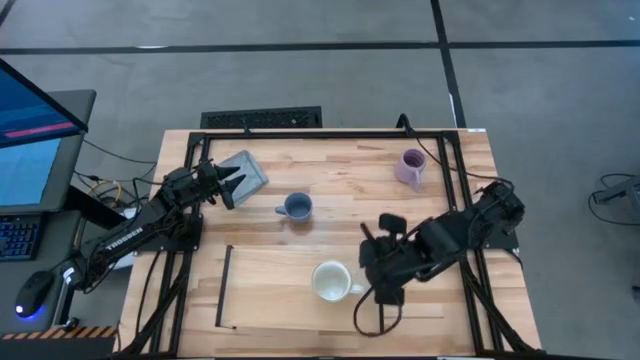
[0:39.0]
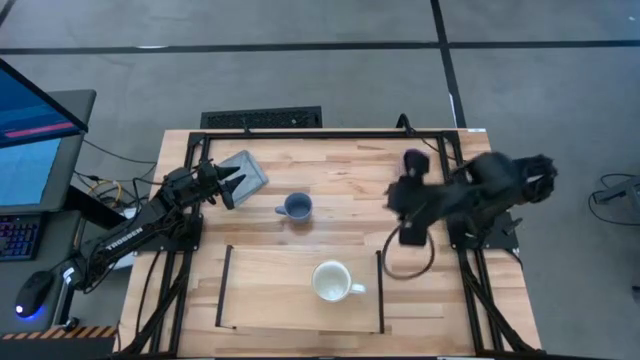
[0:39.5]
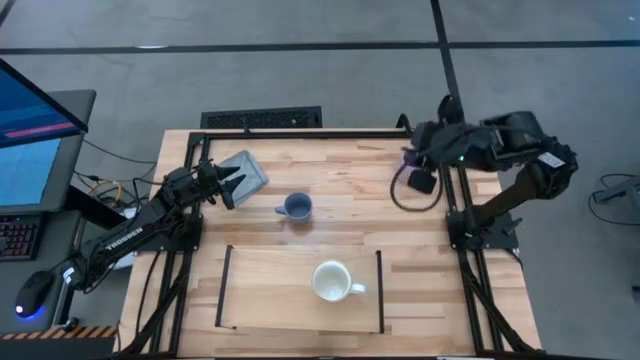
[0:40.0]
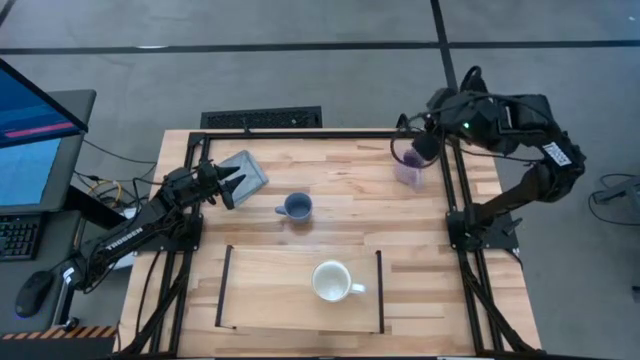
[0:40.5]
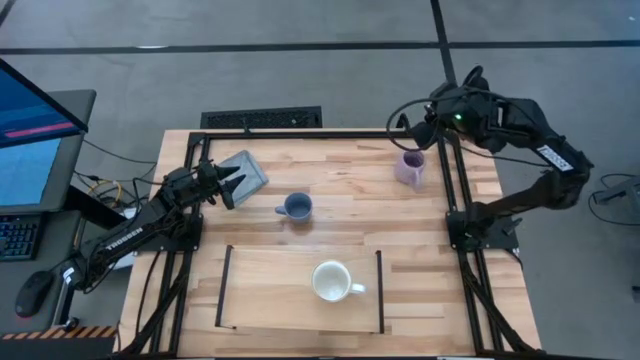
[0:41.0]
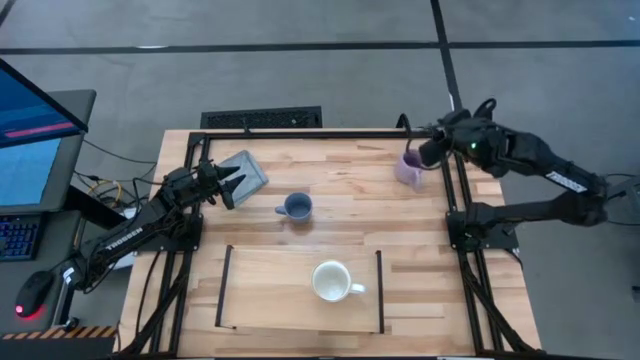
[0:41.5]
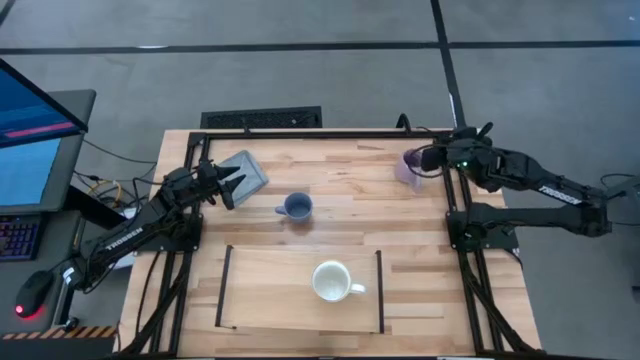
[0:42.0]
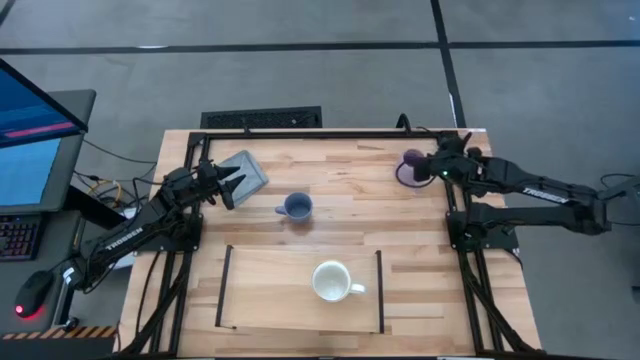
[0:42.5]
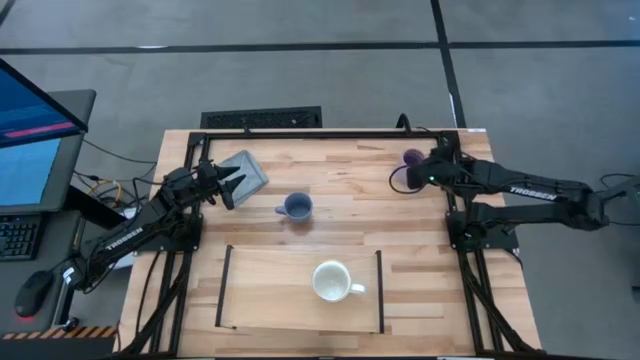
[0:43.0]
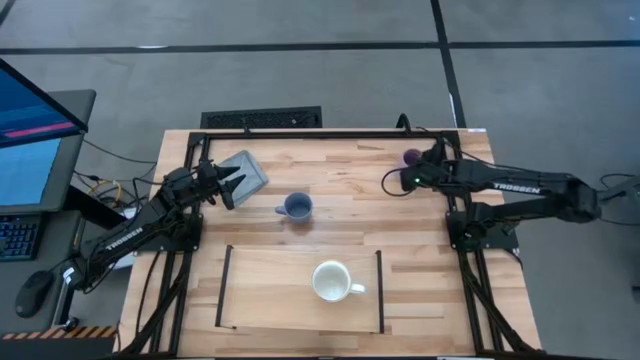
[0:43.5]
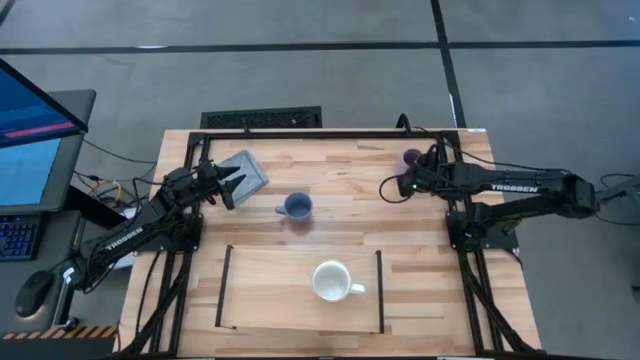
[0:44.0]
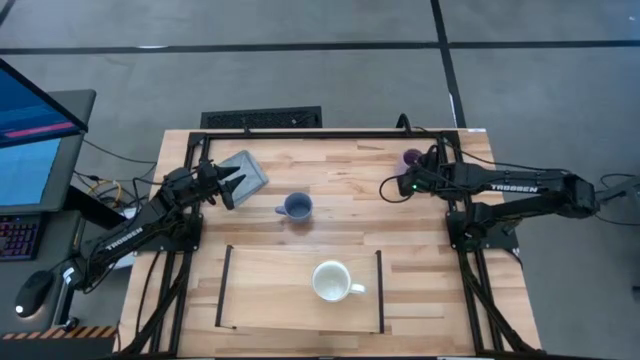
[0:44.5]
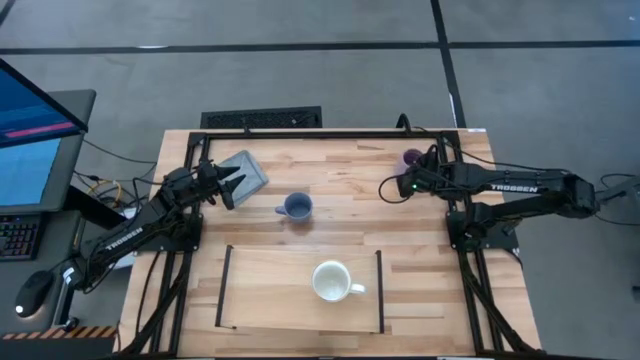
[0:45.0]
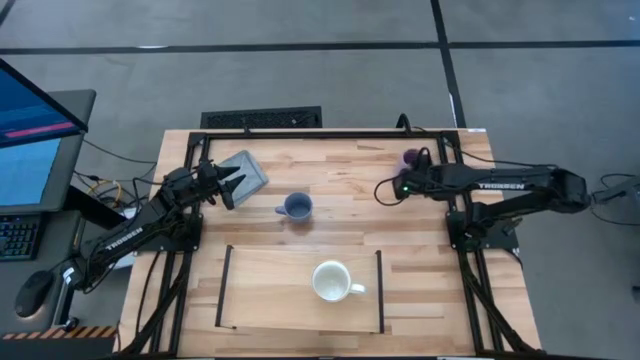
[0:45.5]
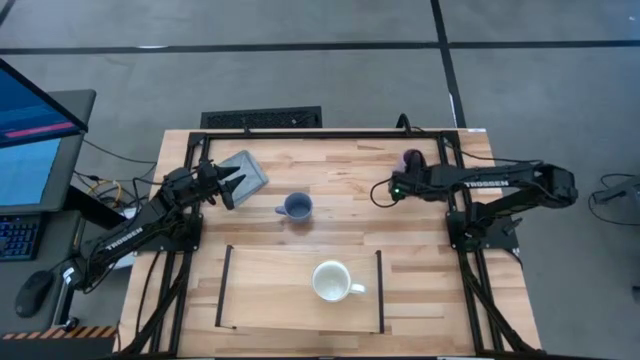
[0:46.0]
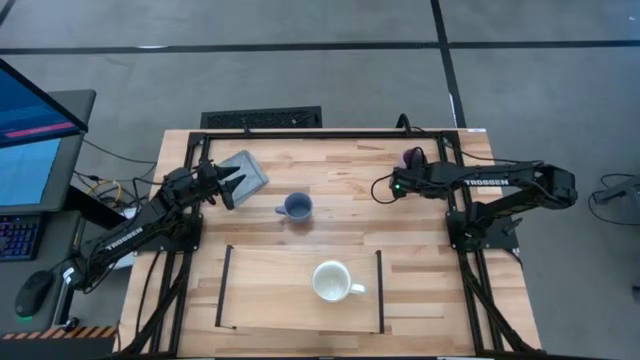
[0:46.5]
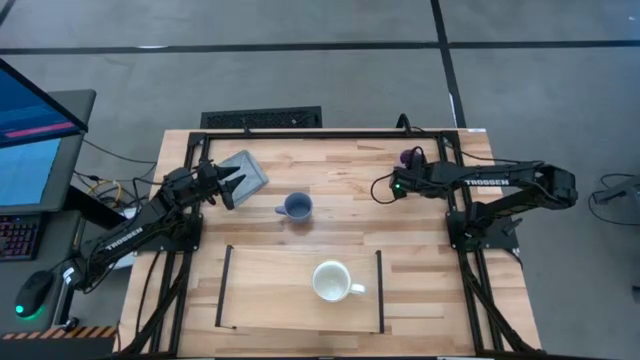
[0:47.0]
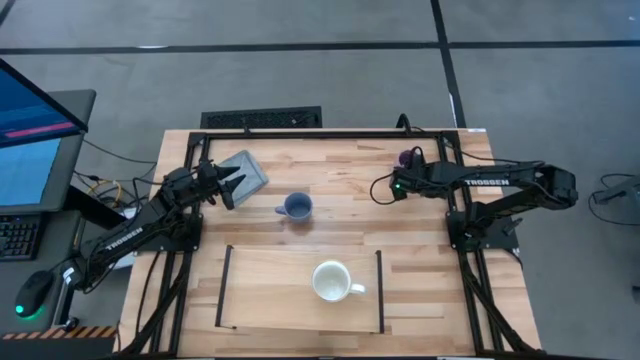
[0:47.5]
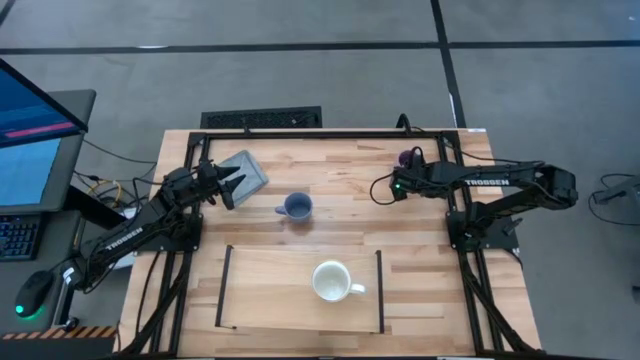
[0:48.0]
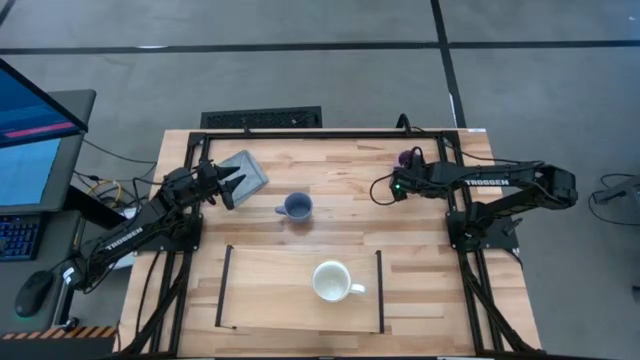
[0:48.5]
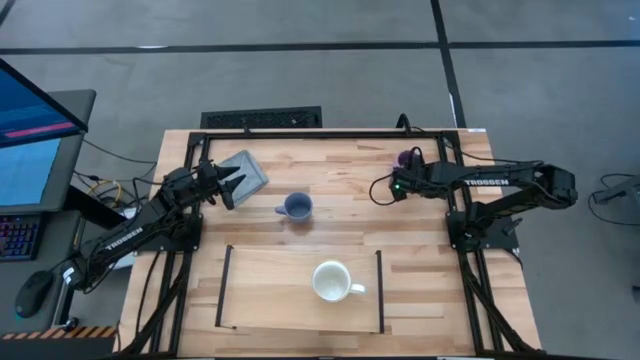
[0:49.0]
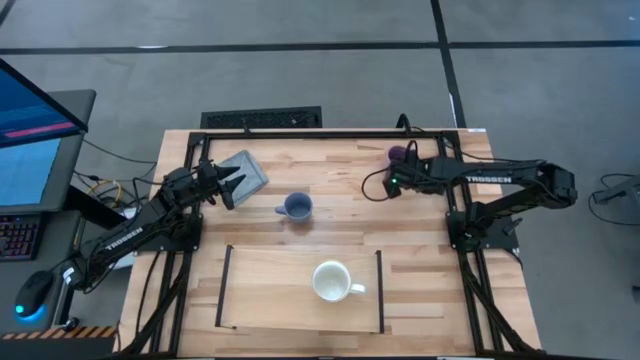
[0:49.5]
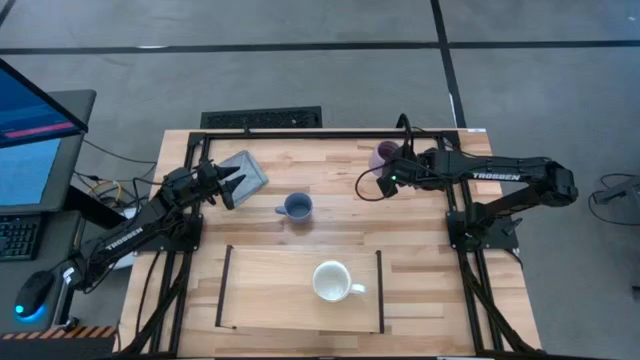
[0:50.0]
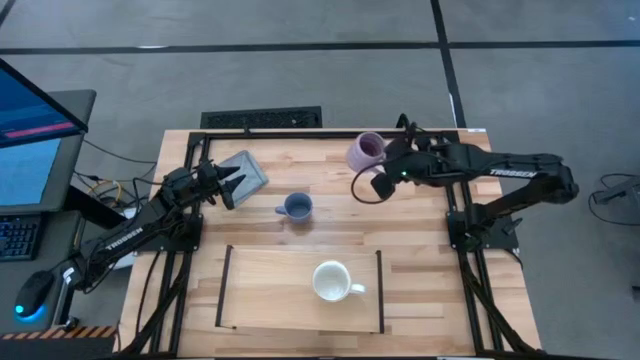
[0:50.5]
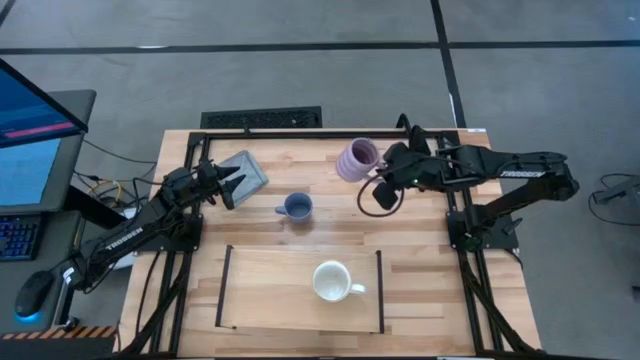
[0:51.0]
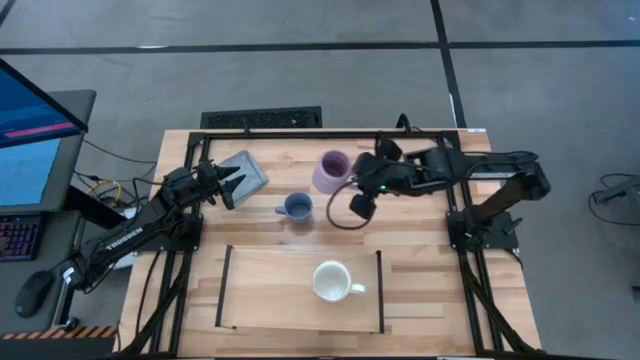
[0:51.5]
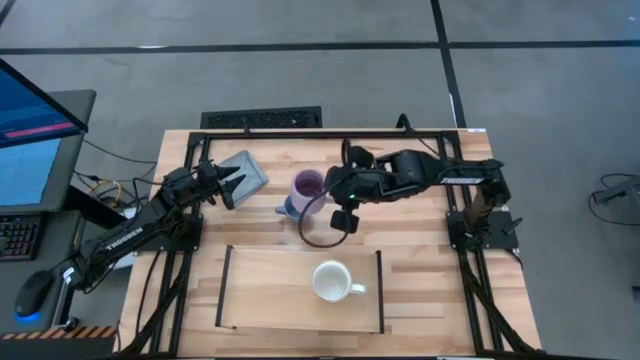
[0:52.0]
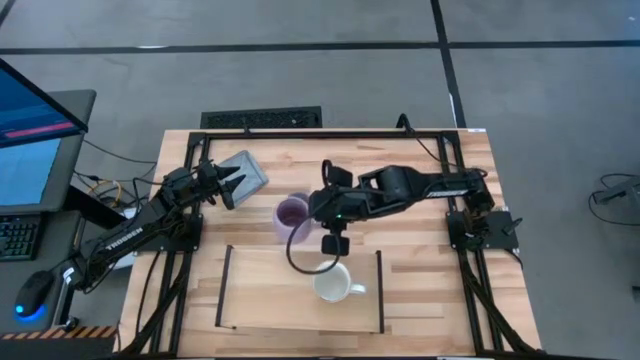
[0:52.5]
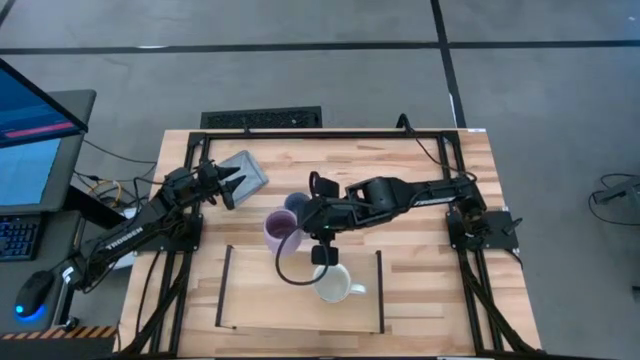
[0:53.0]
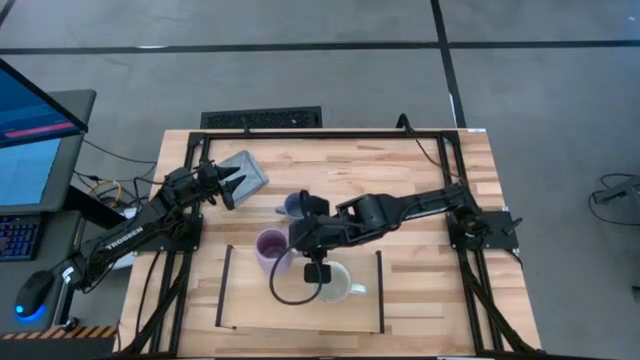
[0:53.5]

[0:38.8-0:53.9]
Task: Stack small to large cups/mugs on shelf
Put the purple mug on the shelf

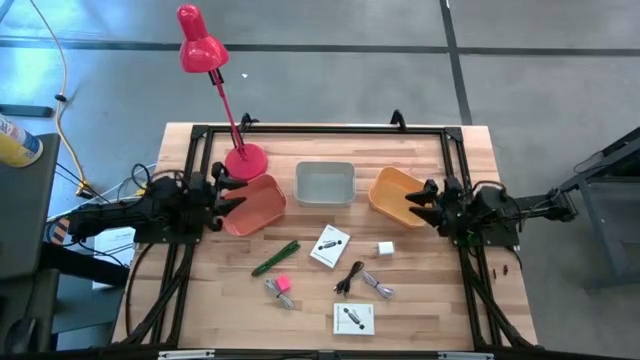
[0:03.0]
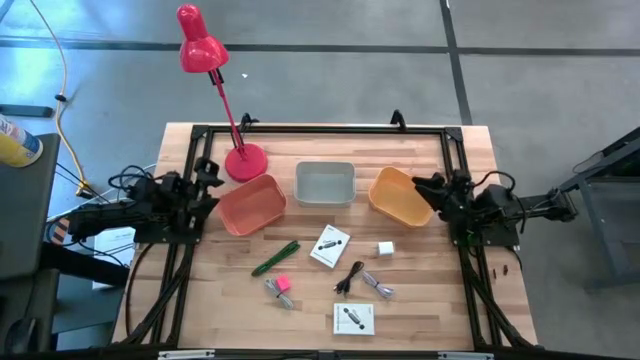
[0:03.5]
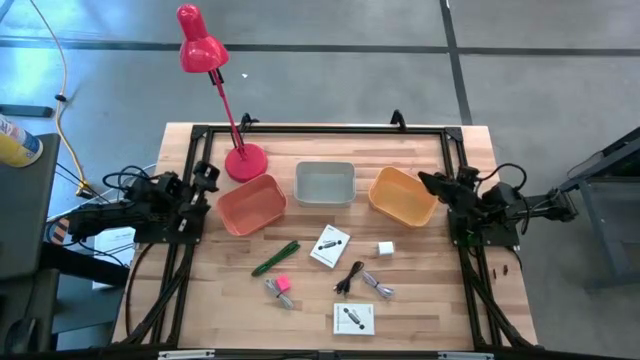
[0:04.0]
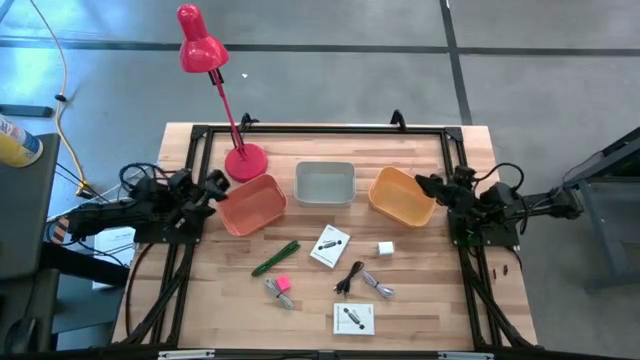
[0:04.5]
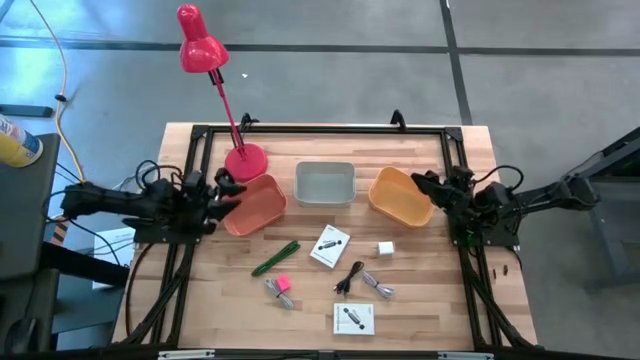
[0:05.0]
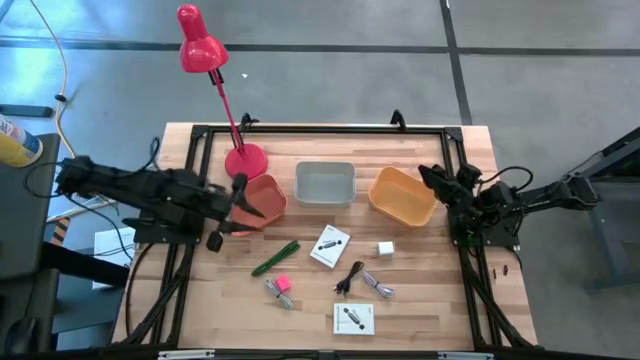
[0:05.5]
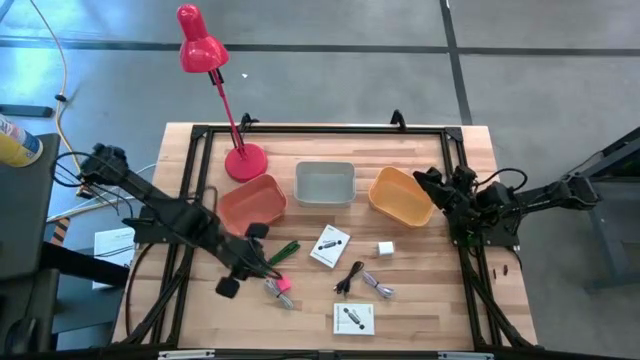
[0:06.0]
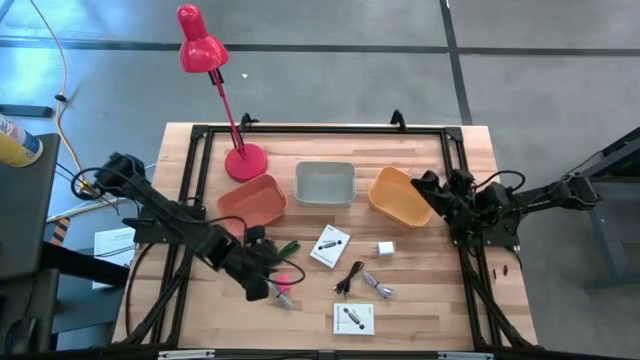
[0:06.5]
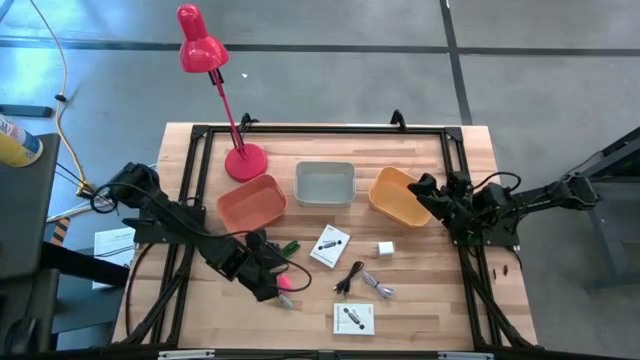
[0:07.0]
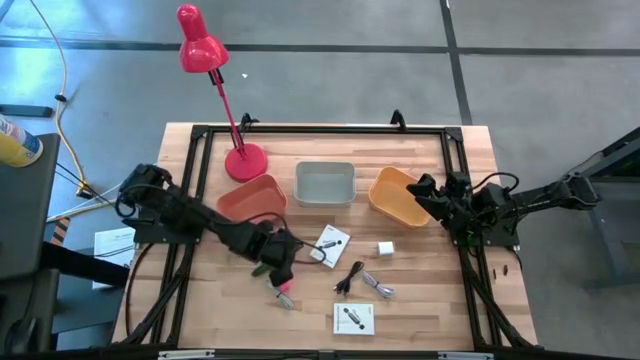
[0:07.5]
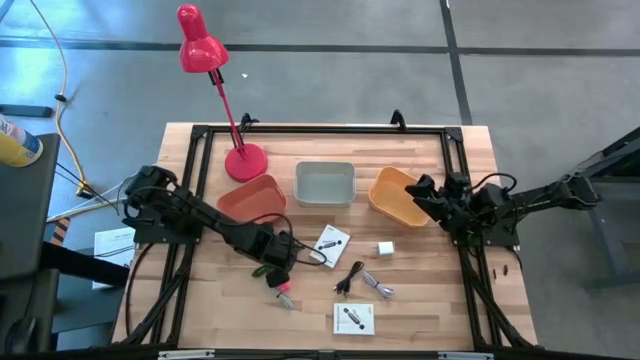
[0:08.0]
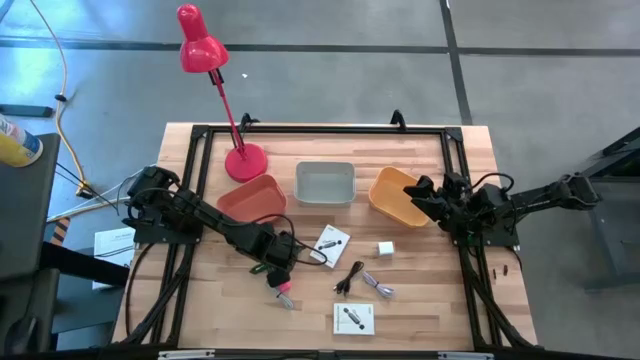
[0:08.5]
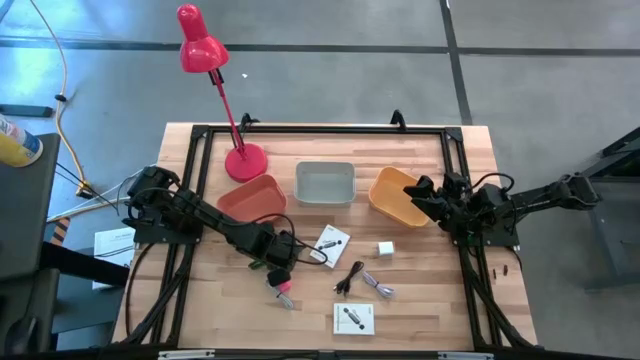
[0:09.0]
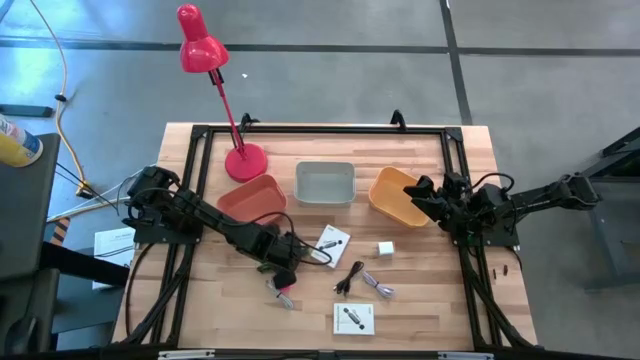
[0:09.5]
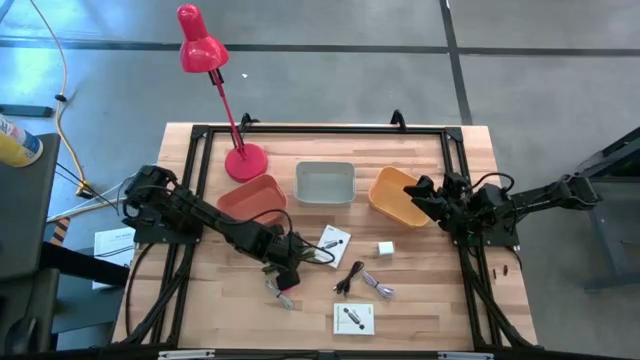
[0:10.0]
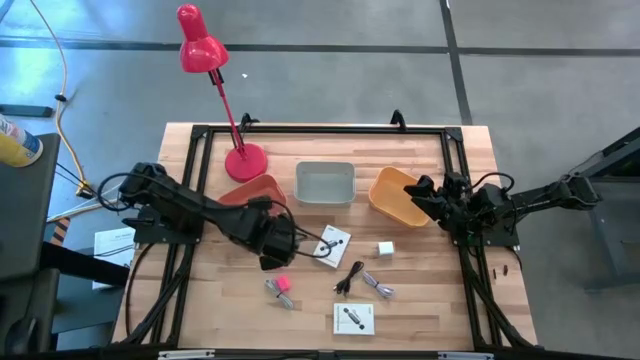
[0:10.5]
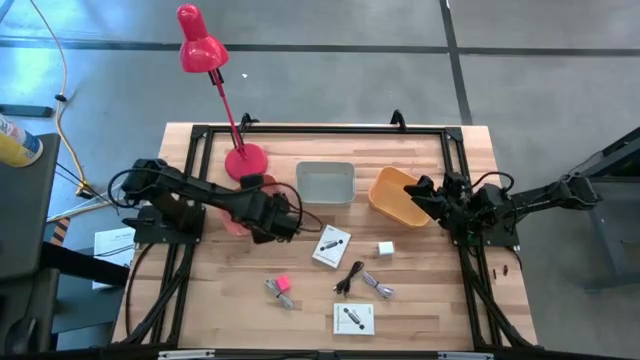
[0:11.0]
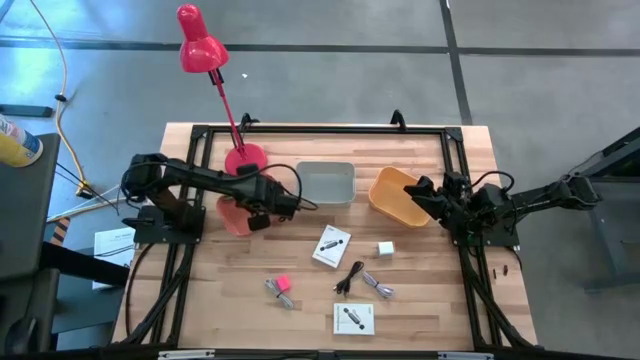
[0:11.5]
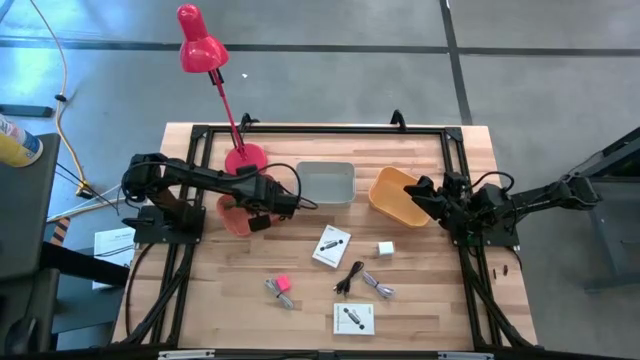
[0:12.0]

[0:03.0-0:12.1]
Task: Pick and place items into bin
Put the green charger cable into the dark brown bin
